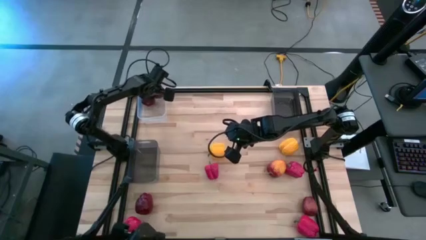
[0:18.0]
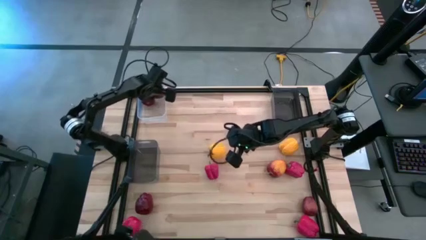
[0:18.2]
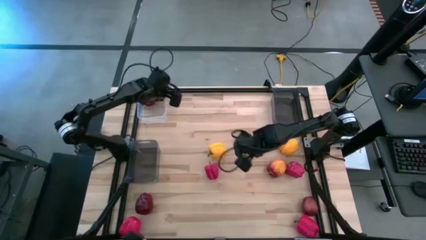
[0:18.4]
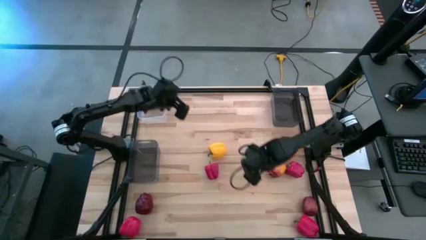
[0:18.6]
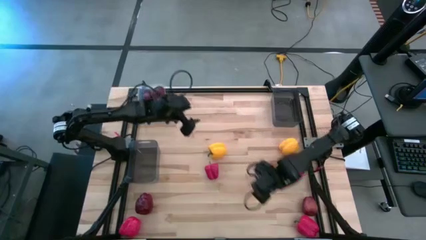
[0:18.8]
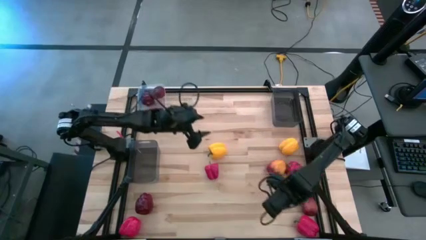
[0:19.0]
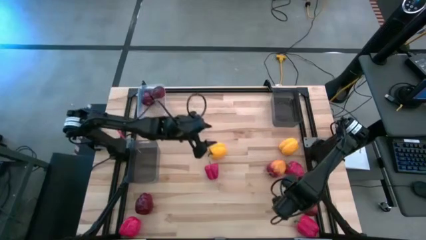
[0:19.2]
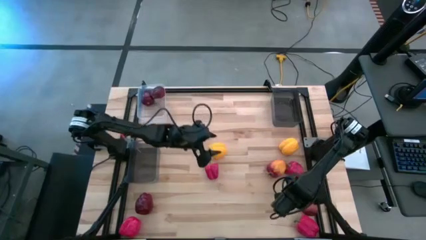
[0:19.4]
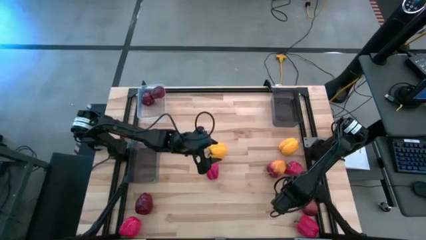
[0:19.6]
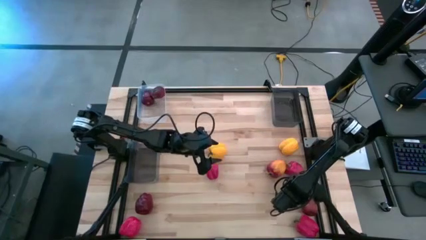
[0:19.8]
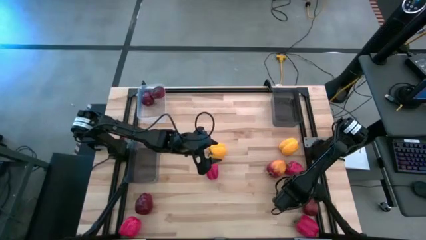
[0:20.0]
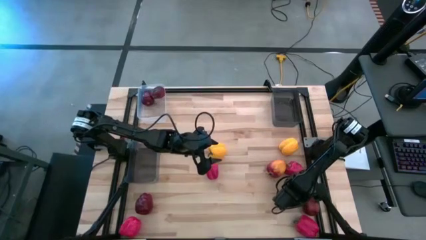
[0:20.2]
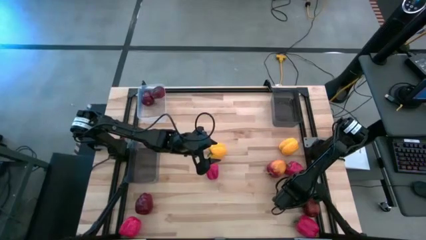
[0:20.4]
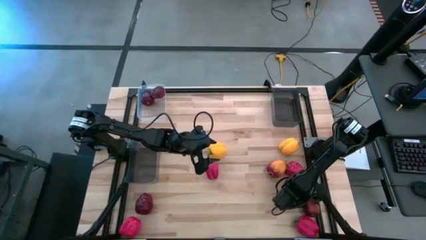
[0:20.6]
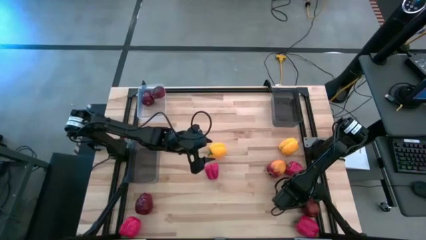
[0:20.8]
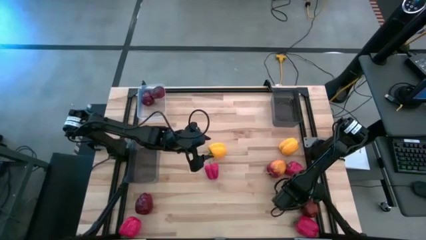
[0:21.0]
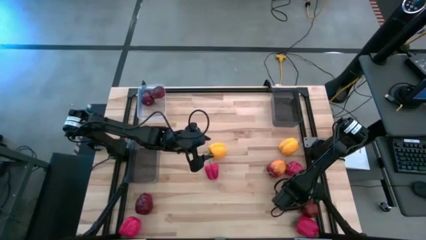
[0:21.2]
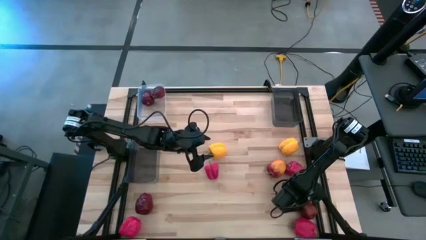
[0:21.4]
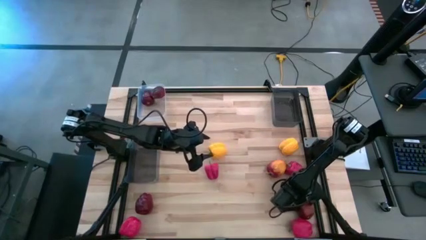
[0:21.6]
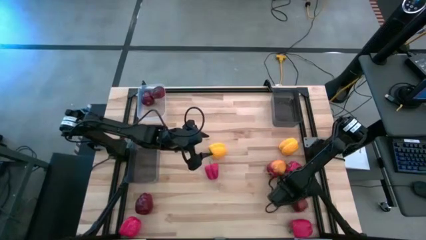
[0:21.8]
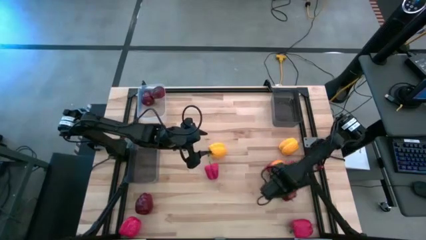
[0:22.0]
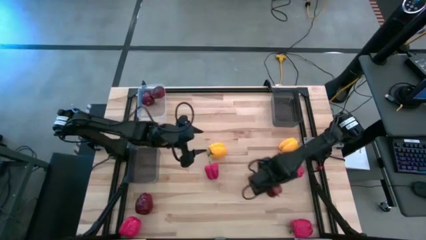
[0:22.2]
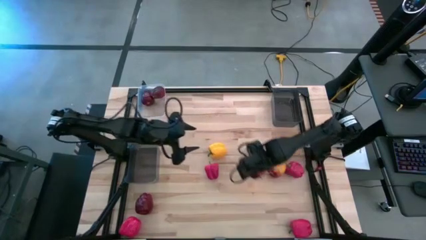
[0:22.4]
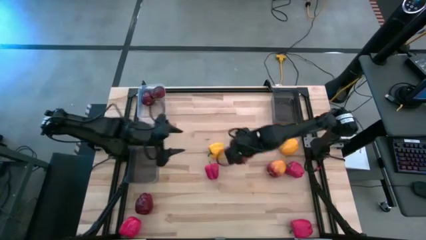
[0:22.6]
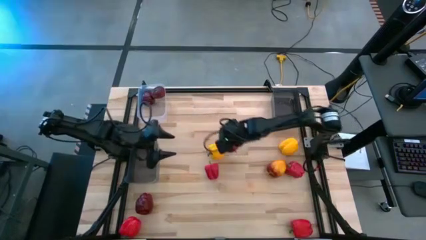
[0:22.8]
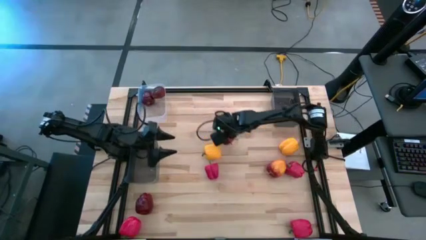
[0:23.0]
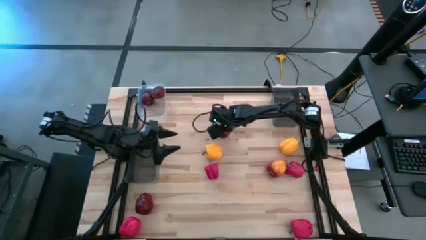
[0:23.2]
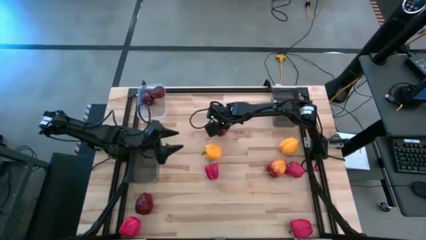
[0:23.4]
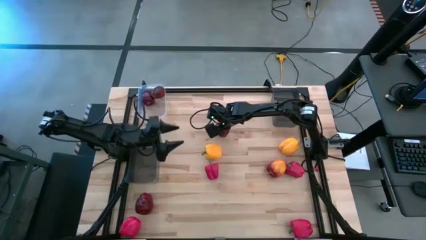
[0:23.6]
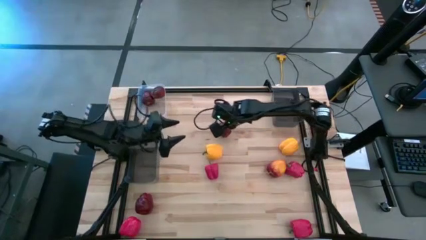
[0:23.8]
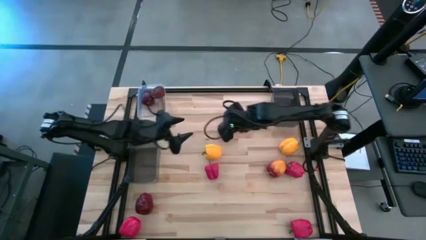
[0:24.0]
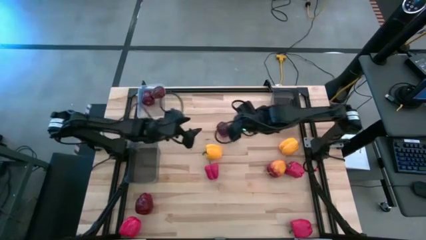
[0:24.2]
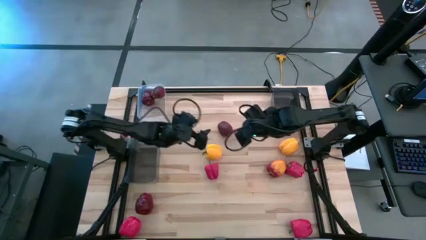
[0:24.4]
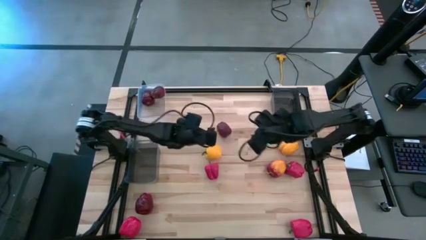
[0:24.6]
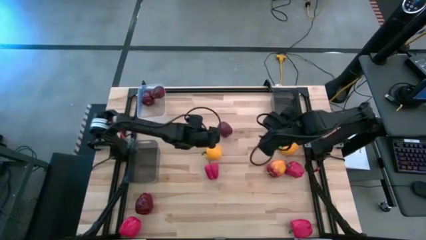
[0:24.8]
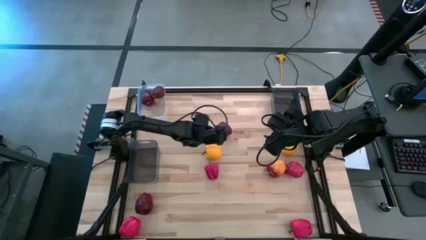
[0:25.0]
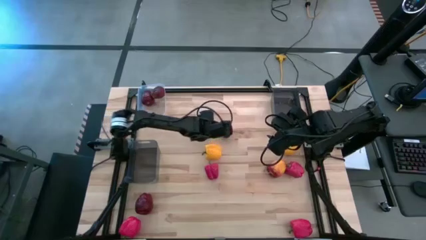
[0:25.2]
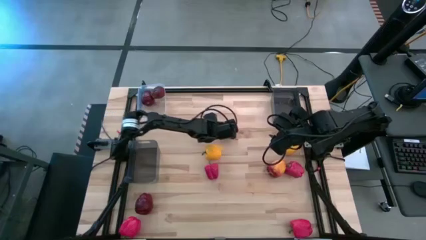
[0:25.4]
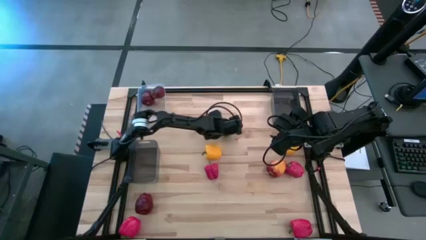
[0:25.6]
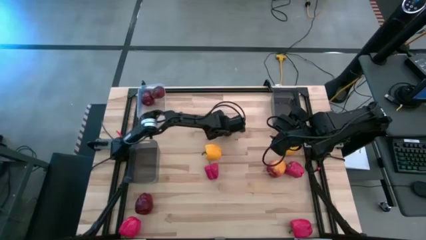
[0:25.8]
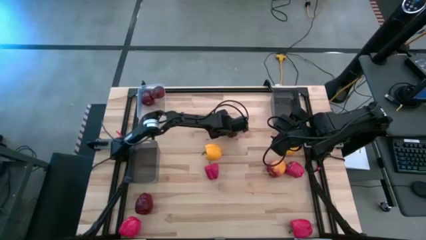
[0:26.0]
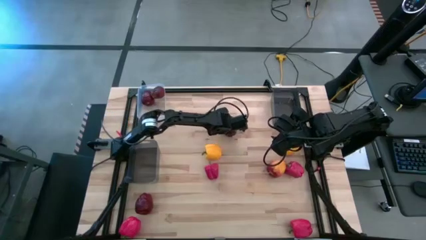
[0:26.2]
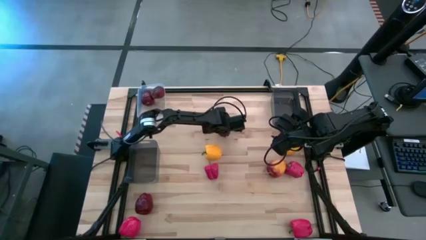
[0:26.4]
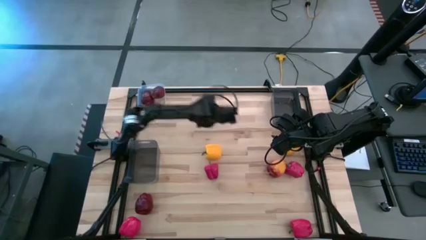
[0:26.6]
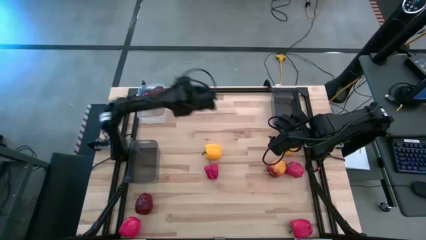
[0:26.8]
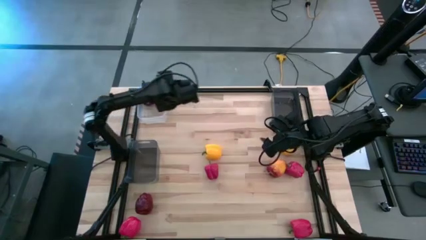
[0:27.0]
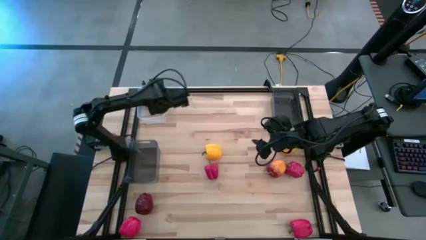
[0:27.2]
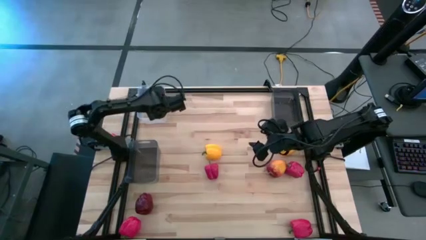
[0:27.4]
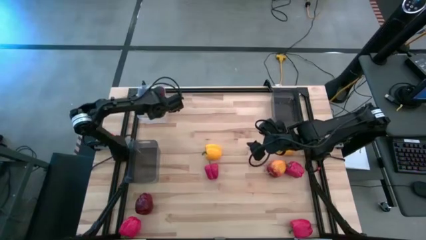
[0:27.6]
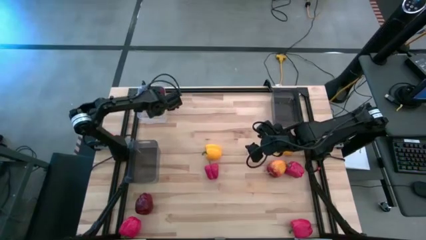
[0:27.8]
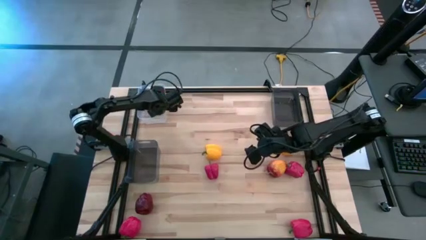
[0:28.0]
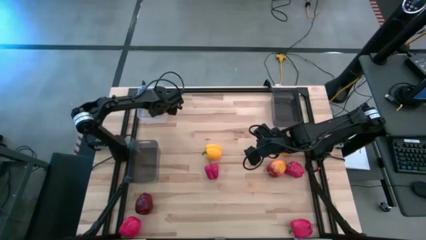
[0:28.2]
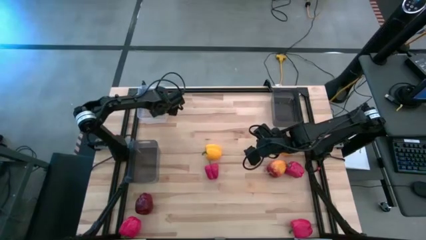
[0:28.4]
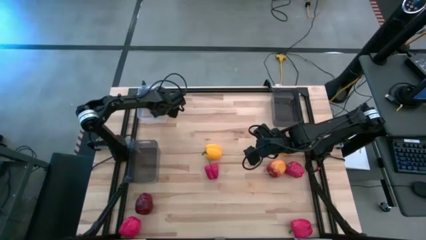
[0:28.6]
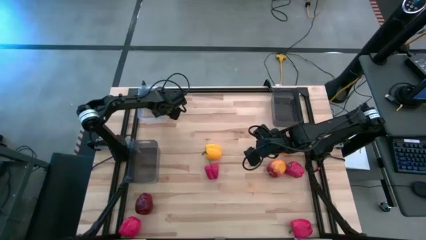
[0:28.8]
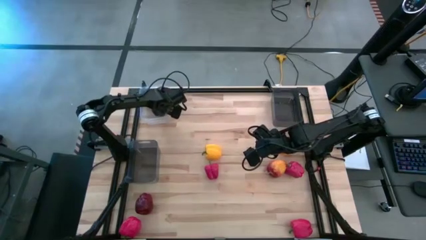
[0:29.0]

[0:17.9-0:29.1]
Task: Sort produce into baskets
Put the red apple into the transparent bin

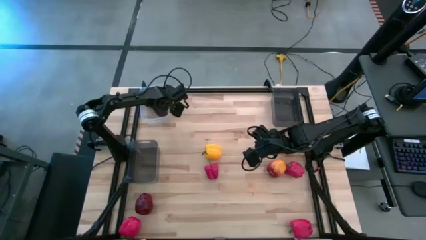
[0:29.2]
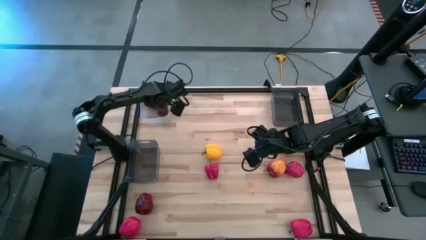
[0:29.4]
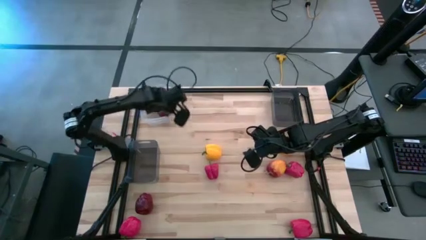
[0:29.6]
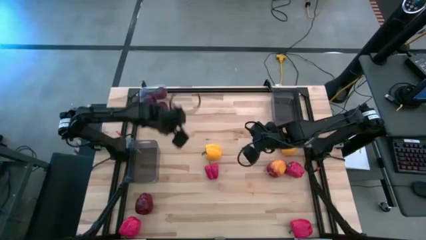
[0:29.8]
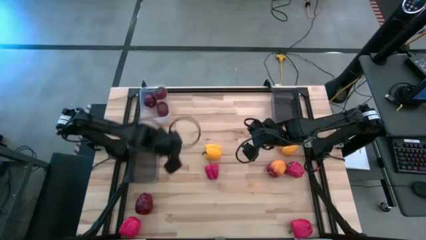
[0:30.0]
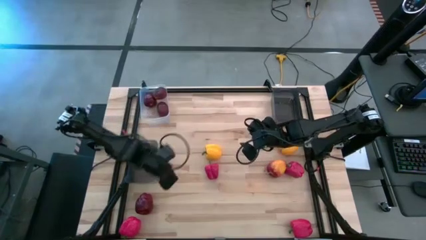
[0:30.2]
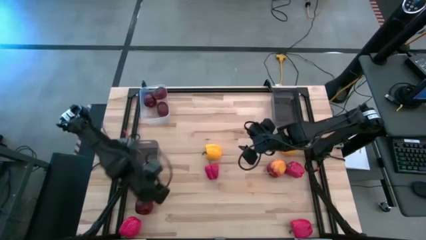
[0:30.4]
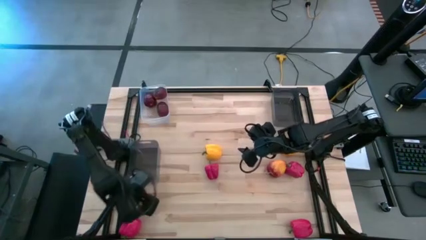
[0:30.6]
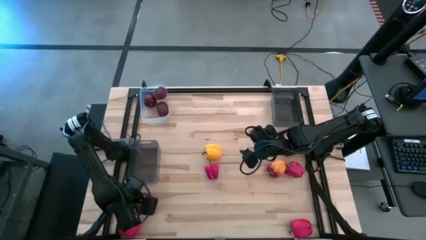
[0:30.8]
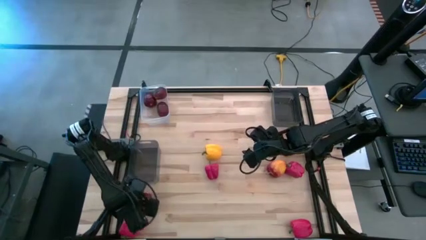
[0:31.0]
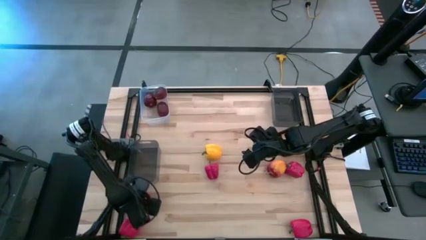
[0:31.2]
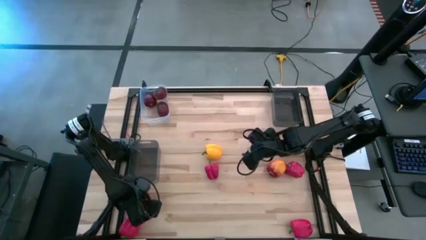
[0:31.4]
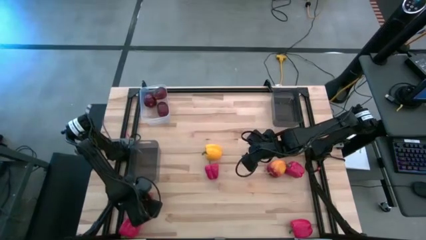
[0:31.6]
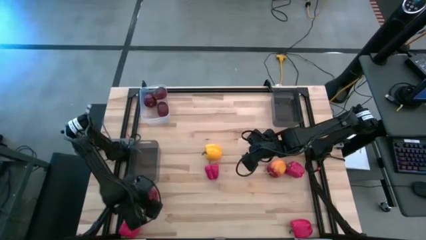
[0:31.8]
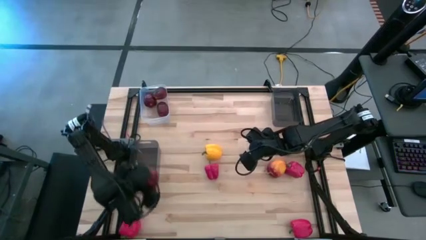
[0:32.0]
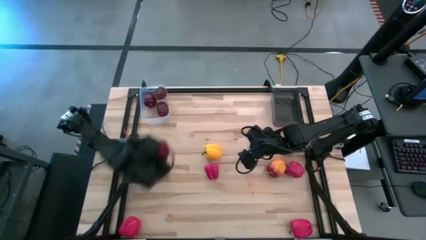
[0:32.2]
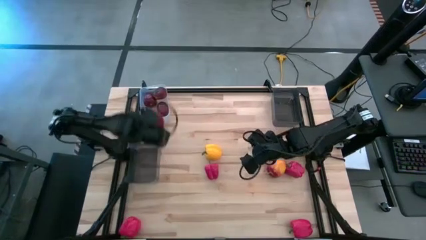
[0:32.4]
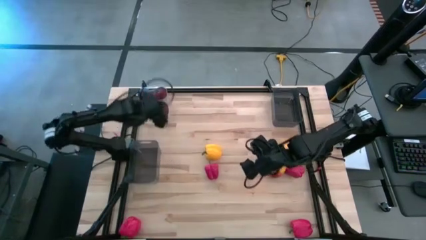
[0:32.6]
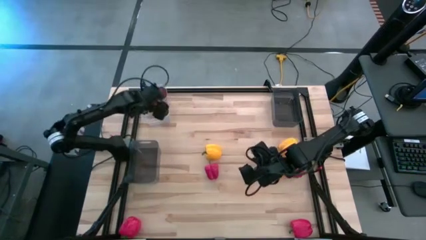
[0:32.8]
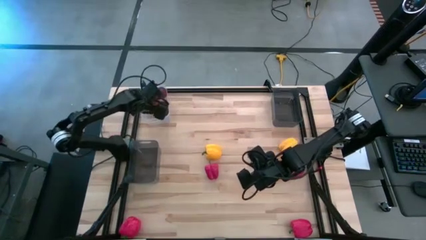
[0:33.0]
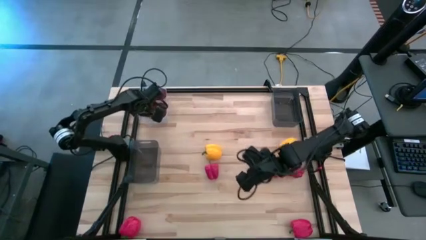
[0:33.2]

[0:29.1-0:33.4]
Put the red apple into the transparent bin
